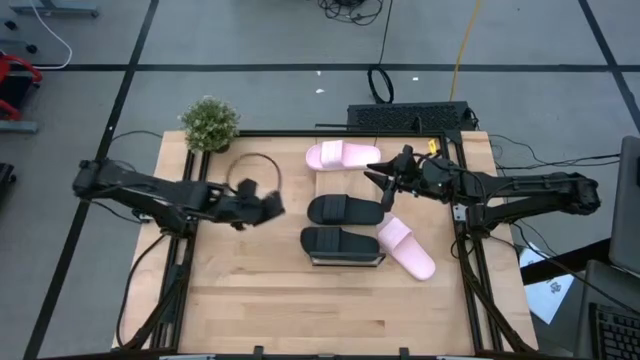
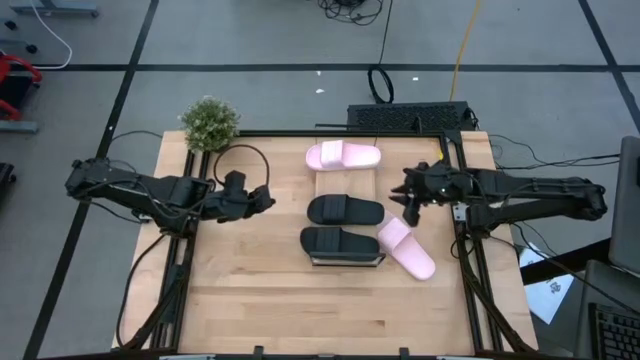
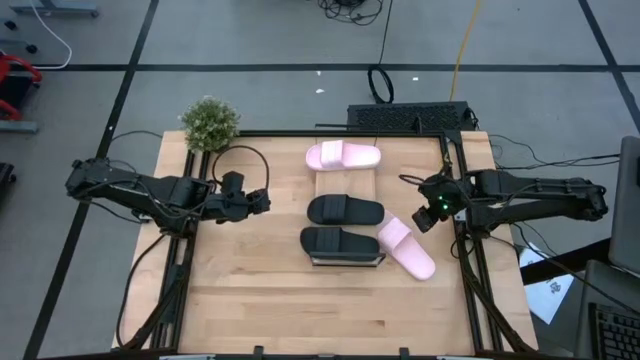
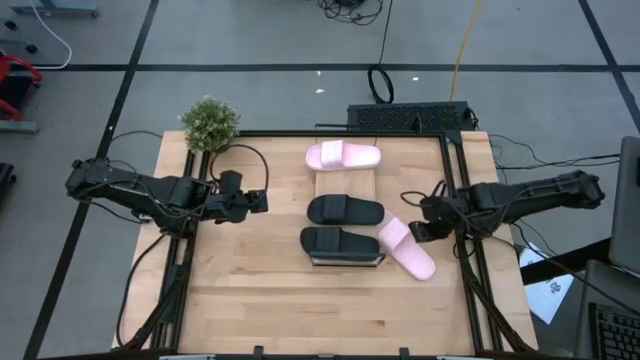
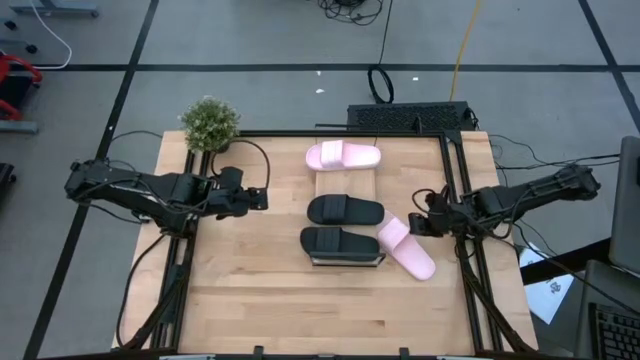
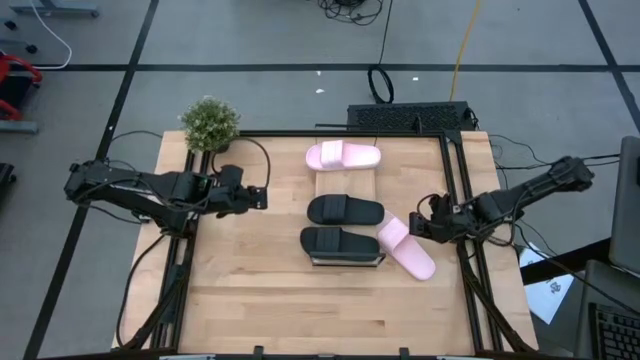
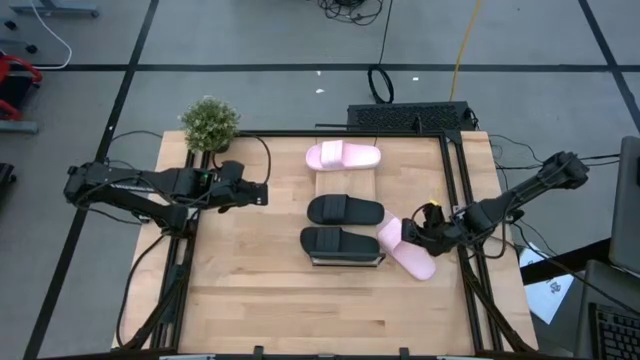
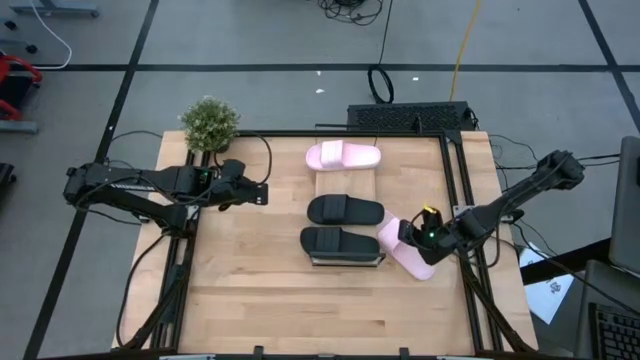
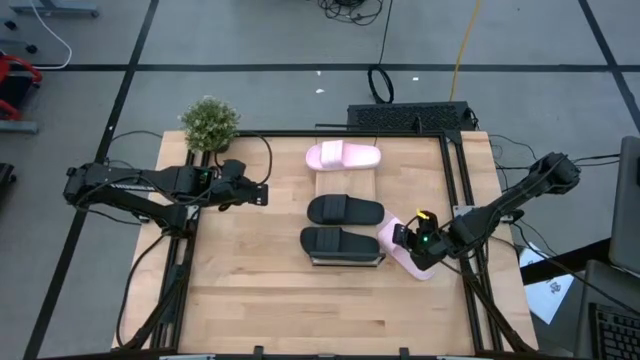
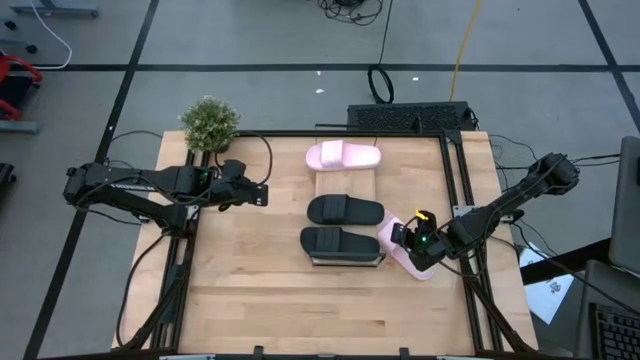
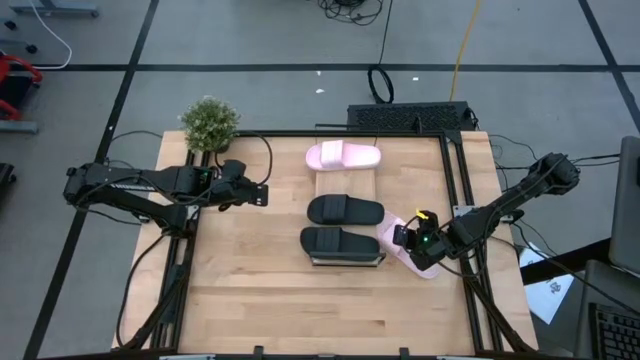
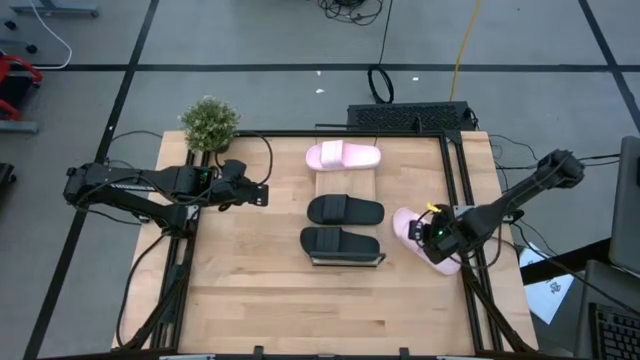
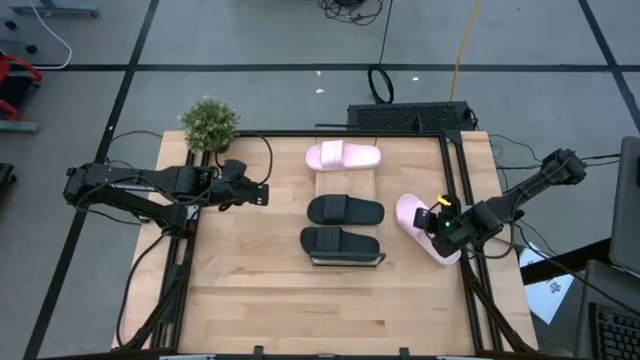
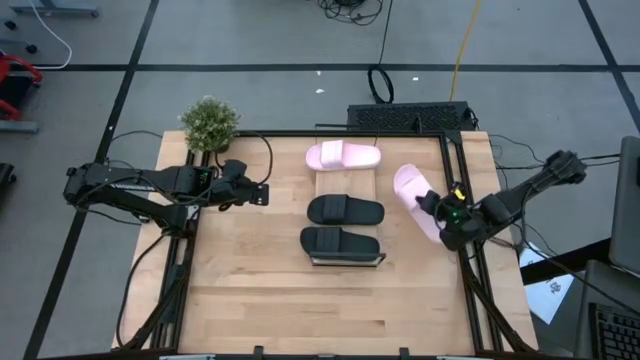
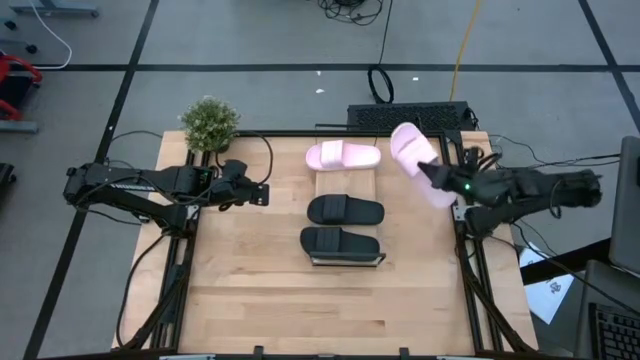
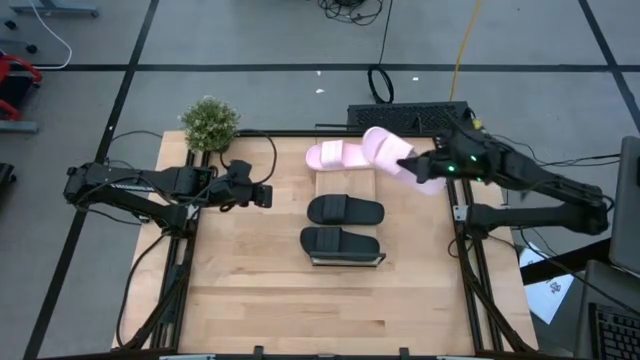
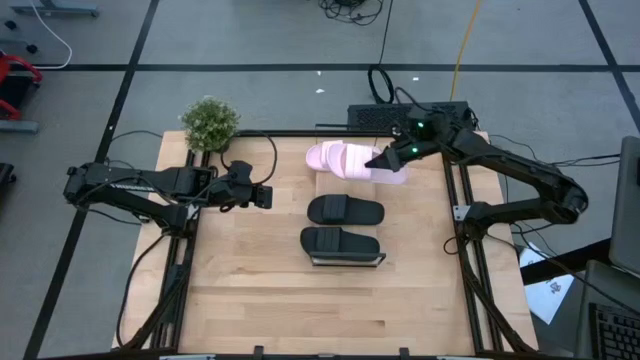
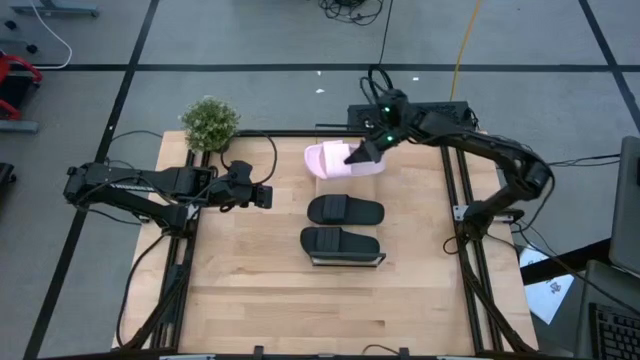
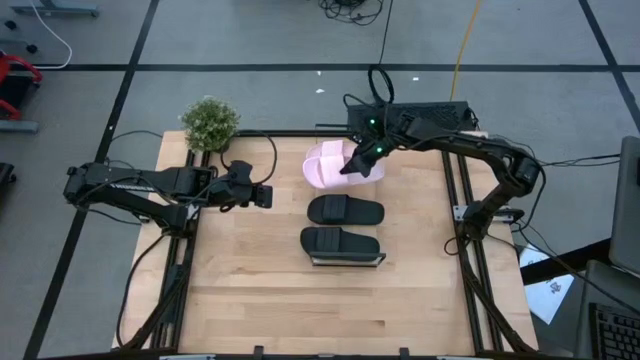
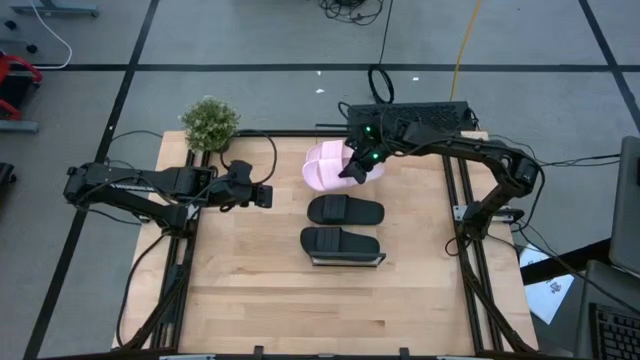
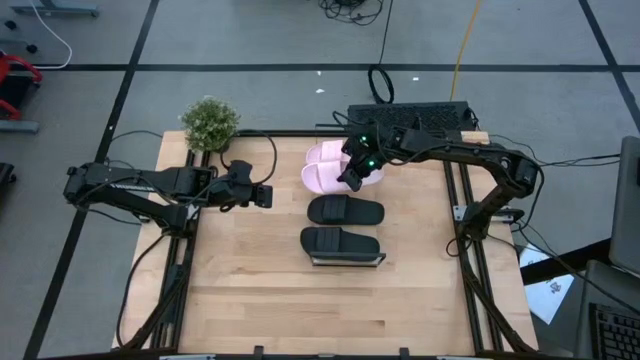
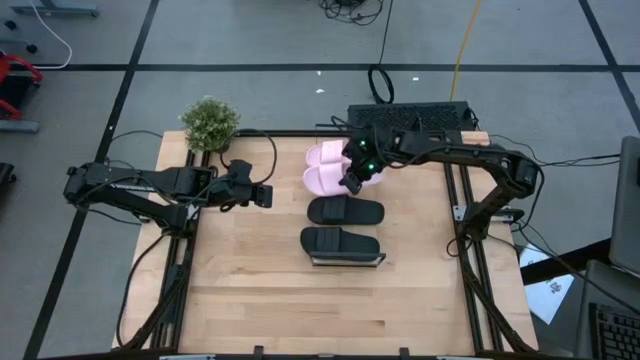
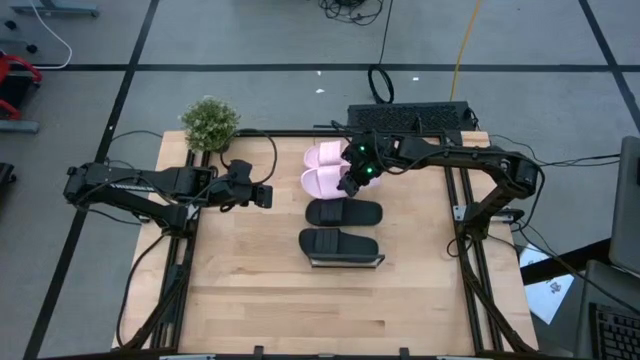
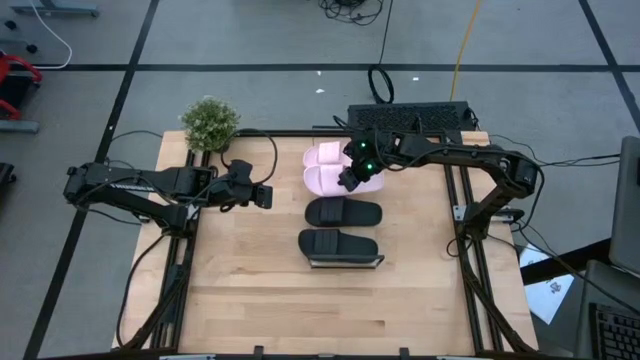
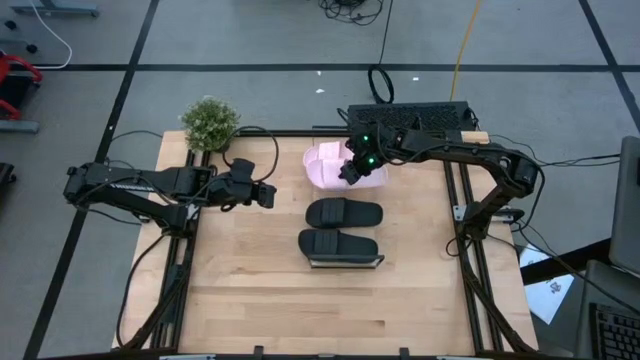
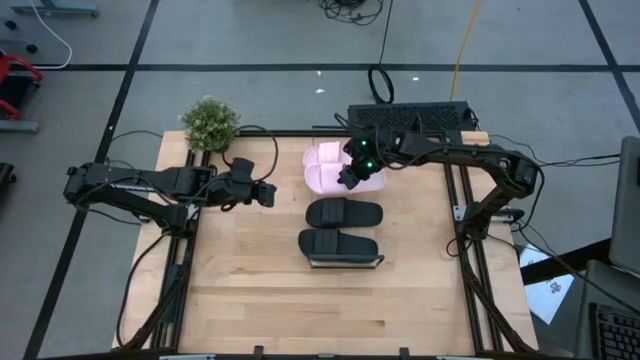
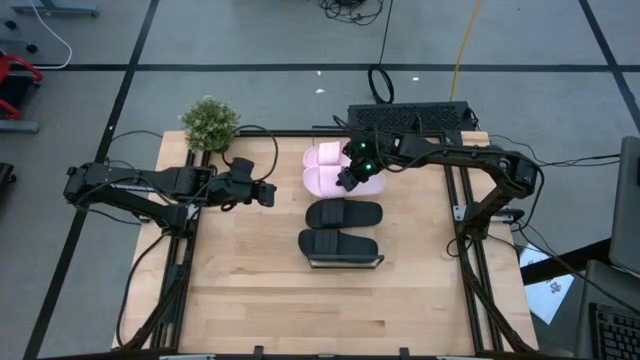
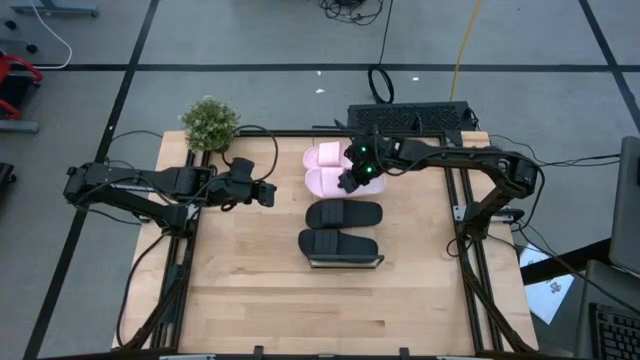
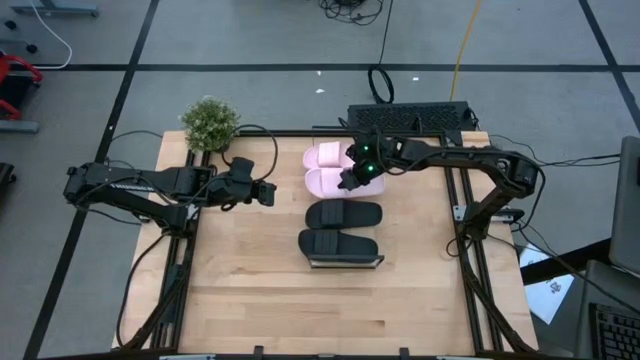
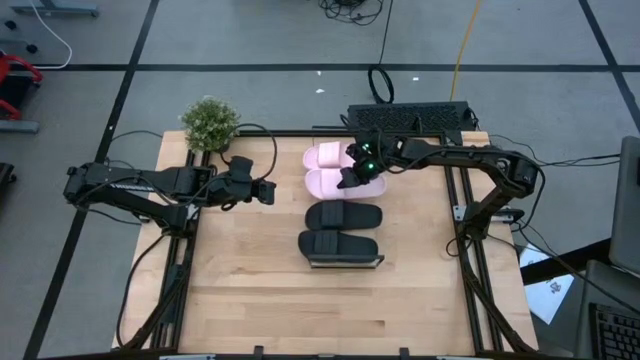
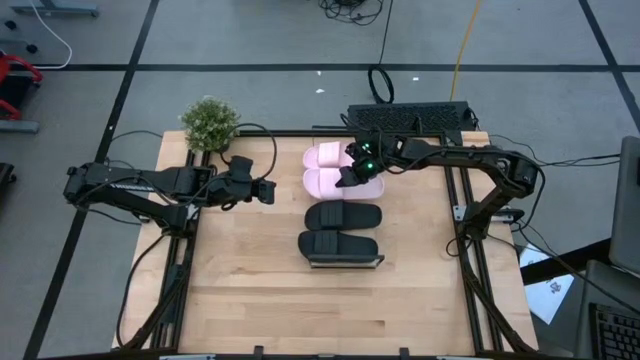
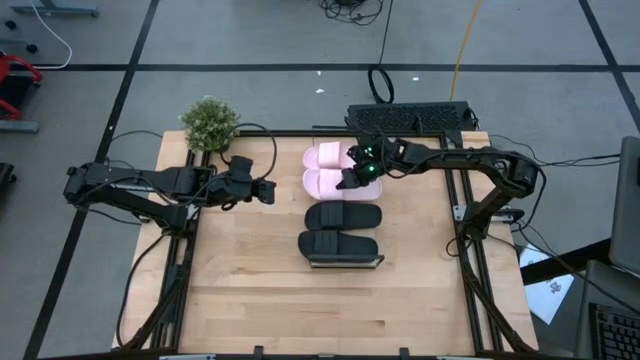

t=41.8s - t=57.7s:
Task: Pick and place slides into the shelf
Put the pink slipper on the shelf

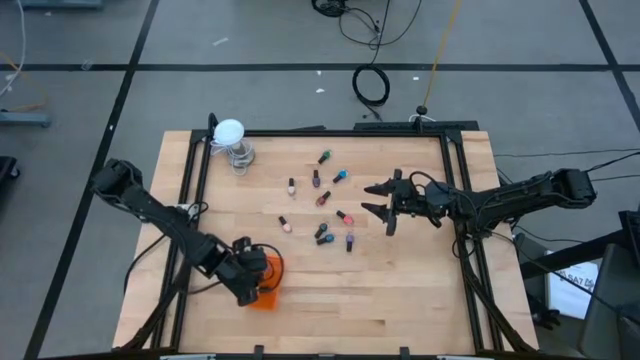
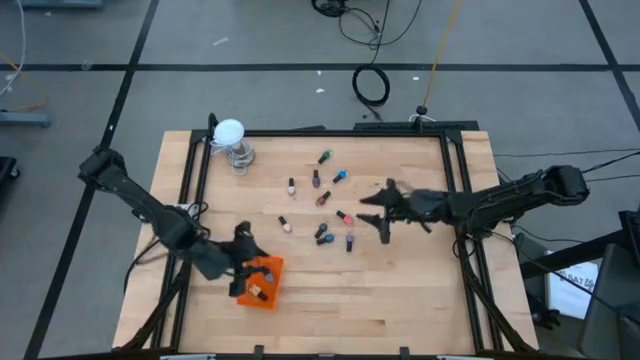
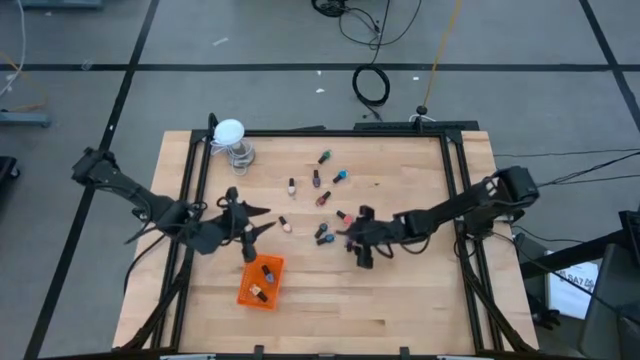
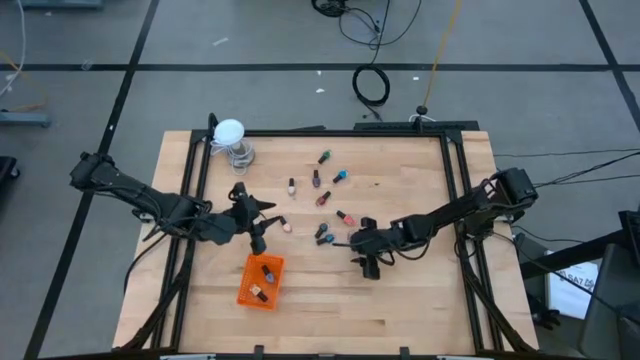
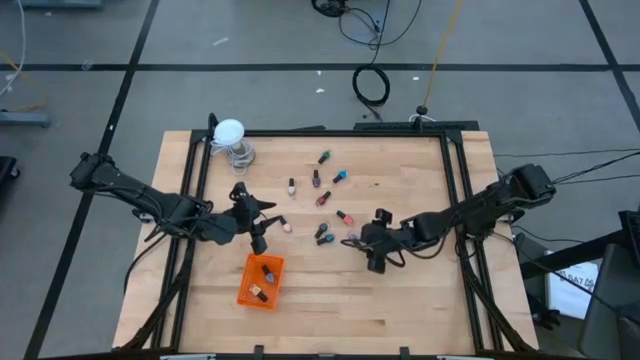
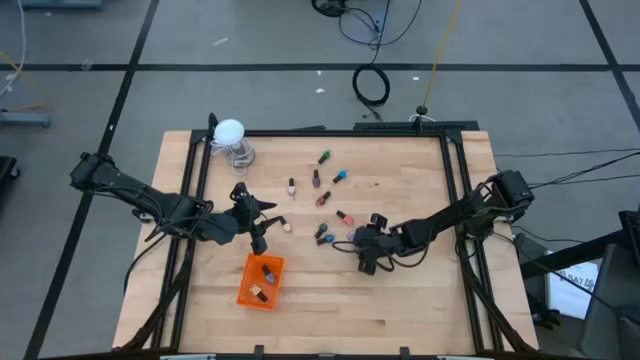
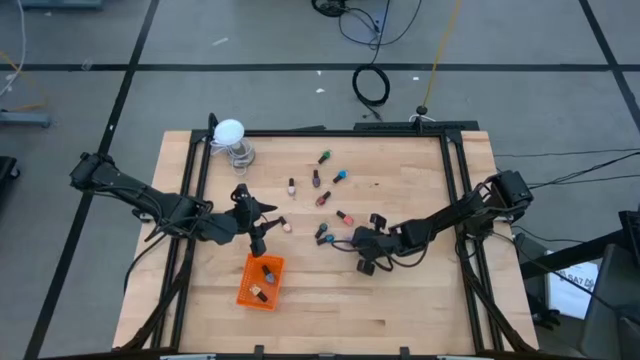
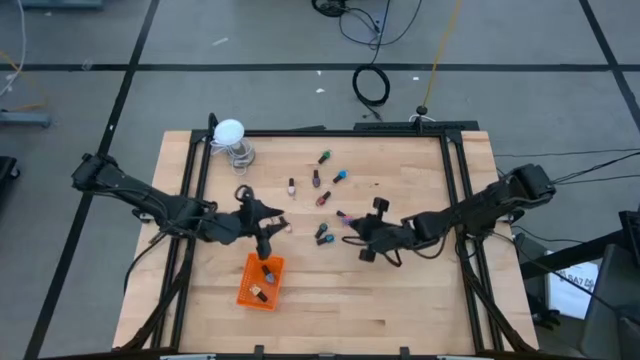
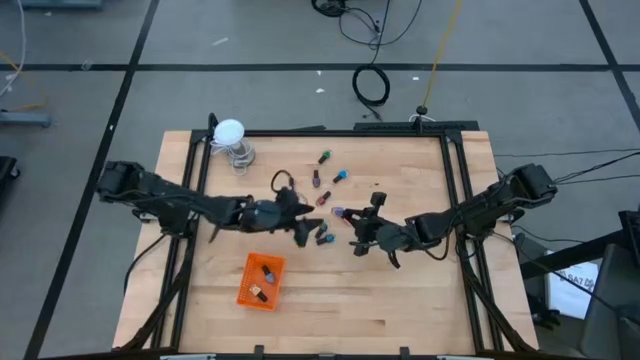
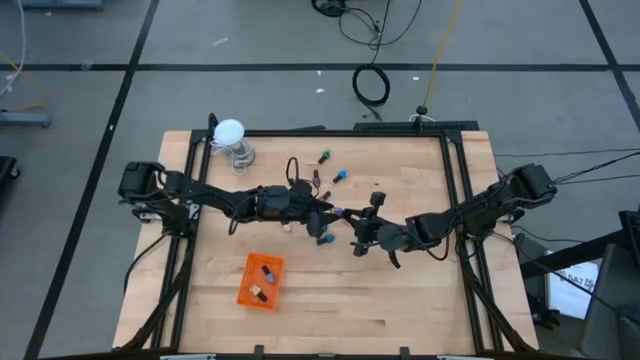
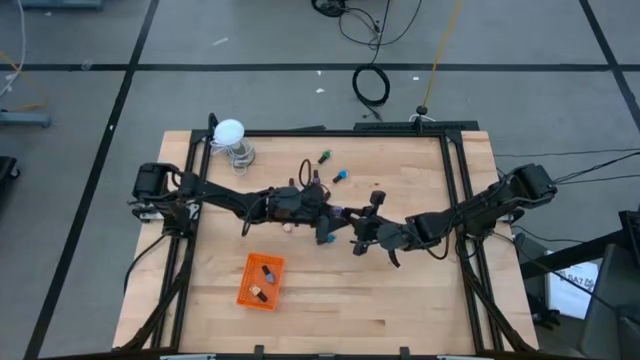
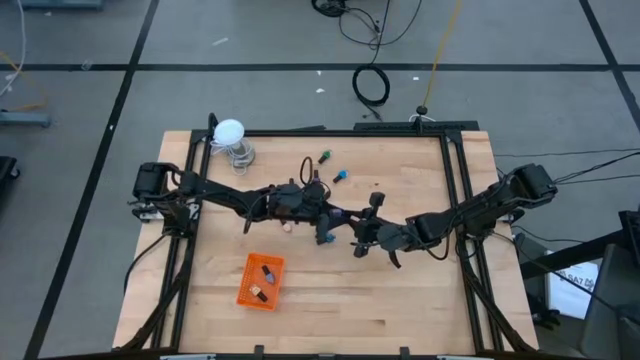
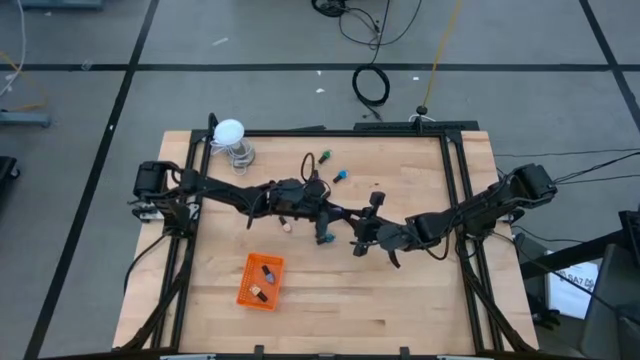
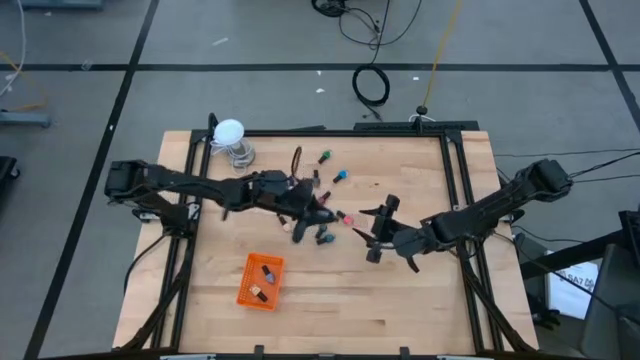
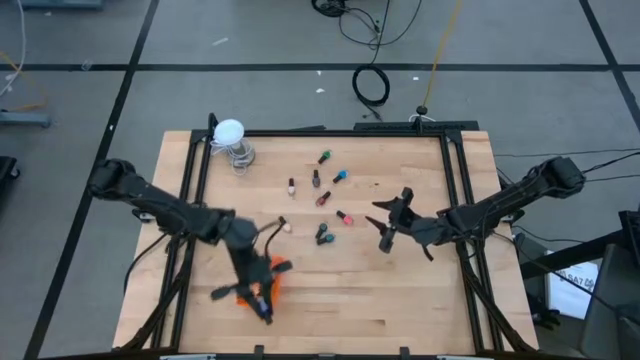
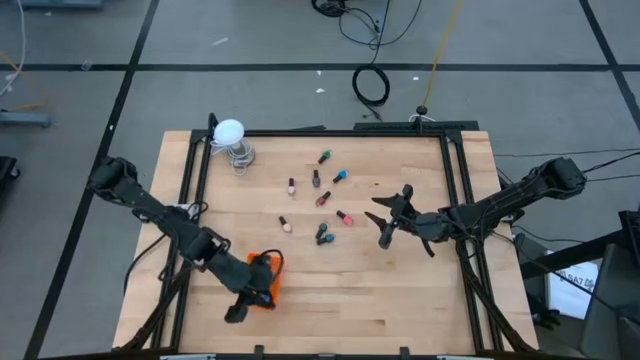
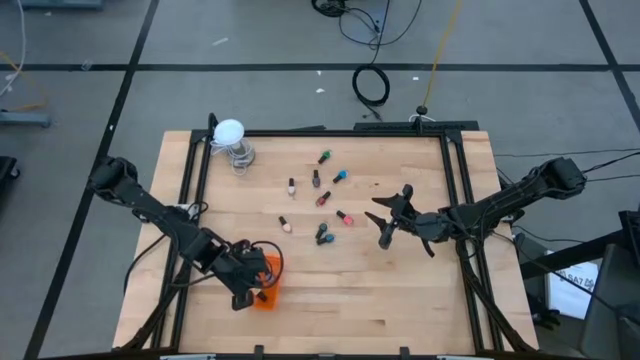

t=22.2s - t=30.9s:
Task: Pick & Place Nail Polish
Put the bottom purple nail color bottle into the orange bin
